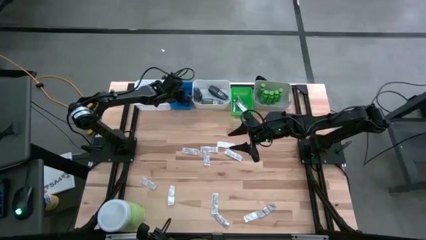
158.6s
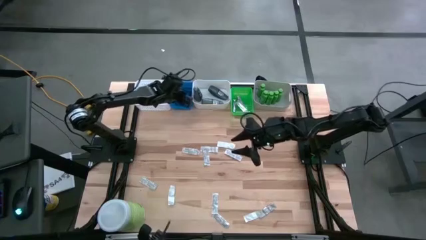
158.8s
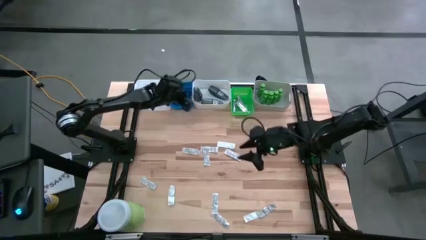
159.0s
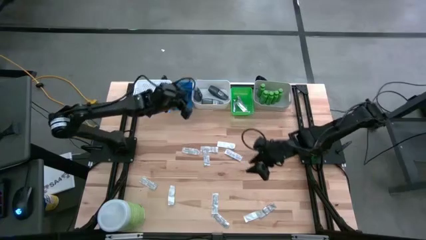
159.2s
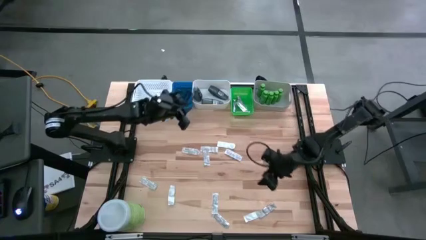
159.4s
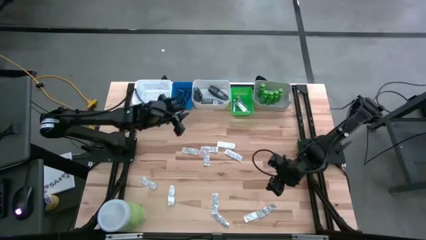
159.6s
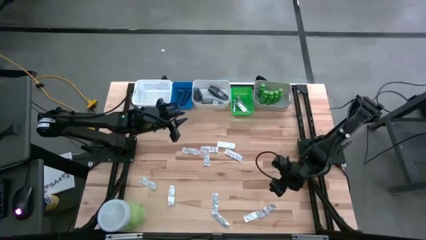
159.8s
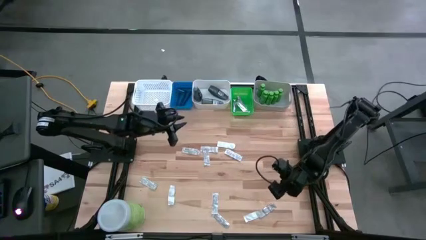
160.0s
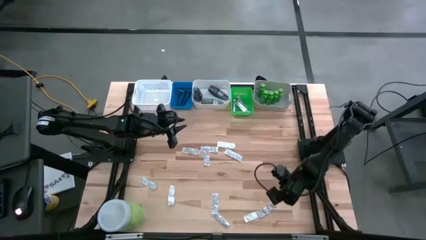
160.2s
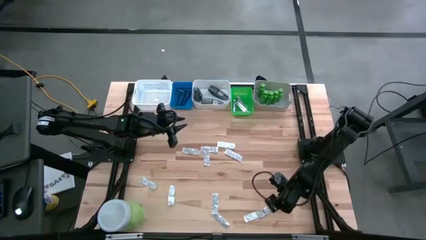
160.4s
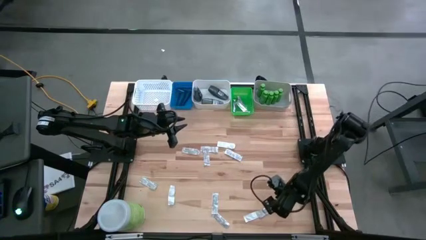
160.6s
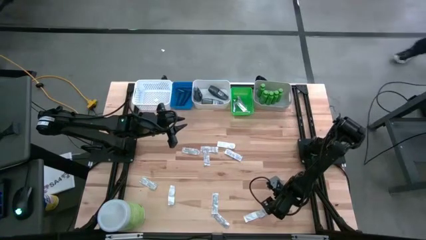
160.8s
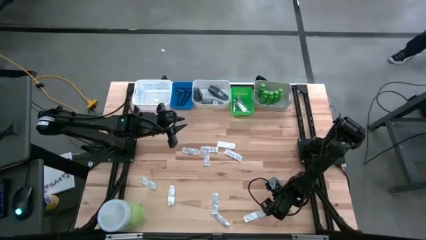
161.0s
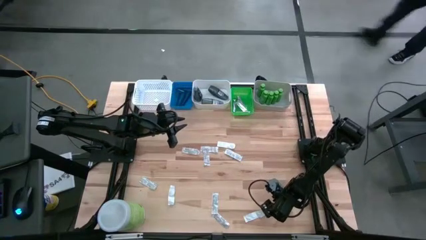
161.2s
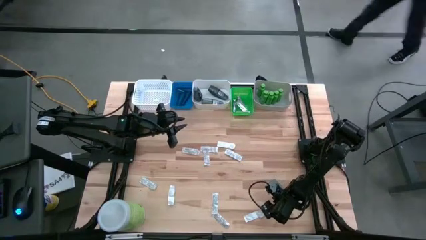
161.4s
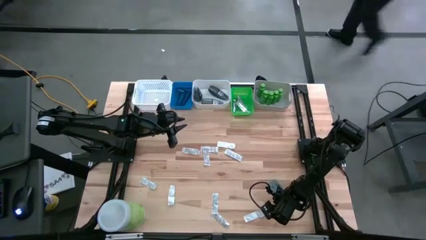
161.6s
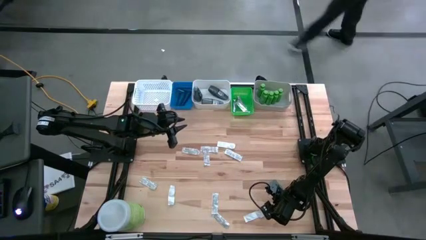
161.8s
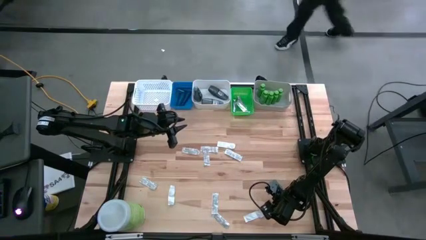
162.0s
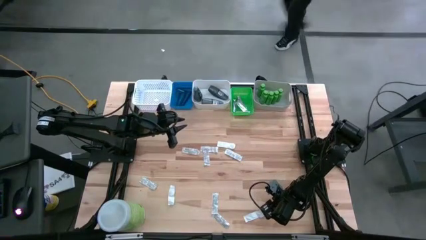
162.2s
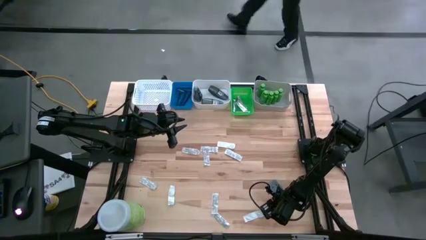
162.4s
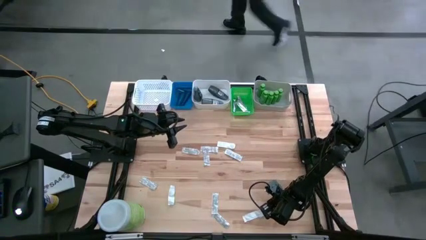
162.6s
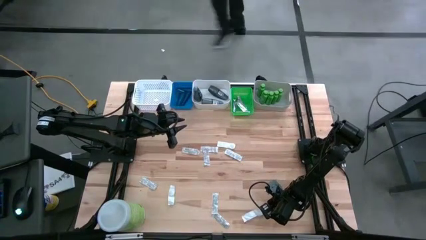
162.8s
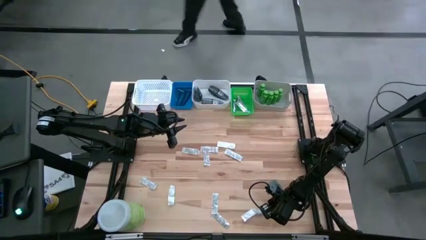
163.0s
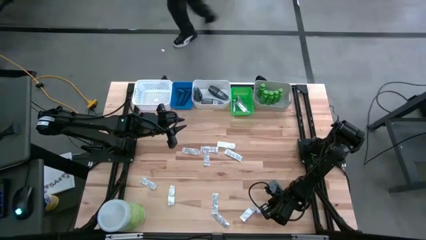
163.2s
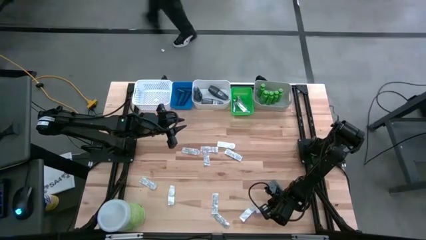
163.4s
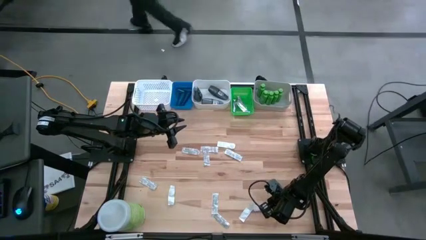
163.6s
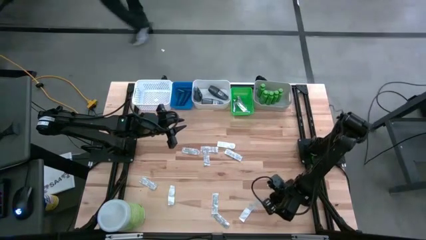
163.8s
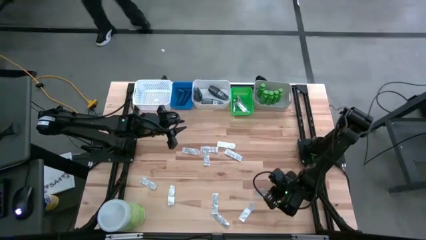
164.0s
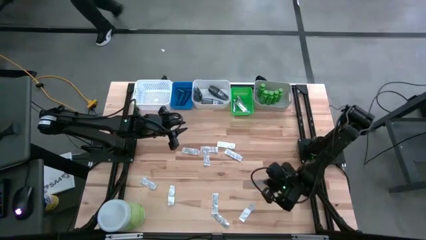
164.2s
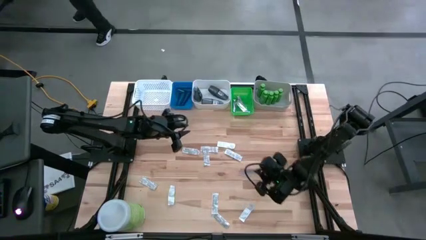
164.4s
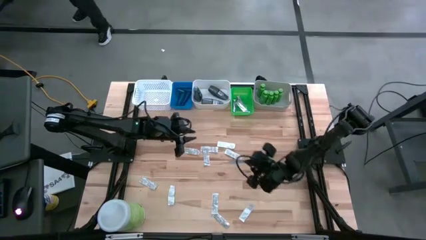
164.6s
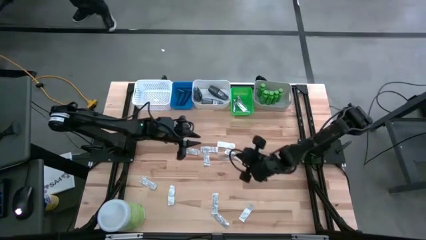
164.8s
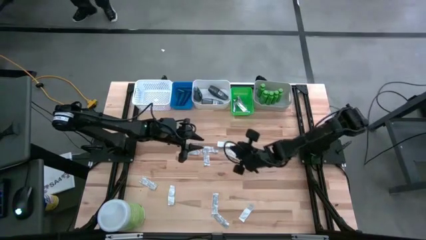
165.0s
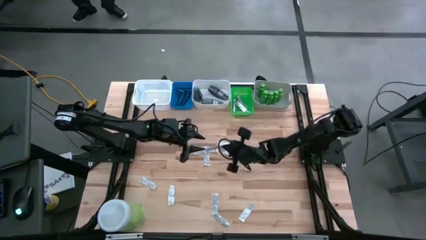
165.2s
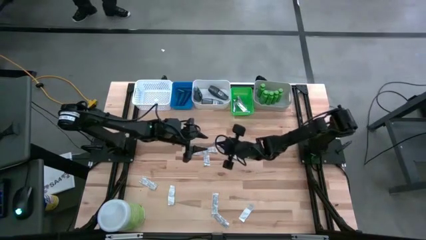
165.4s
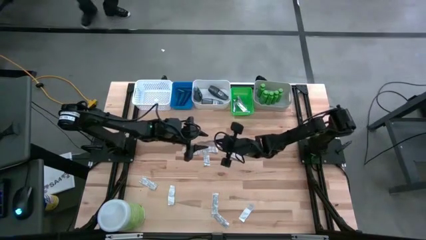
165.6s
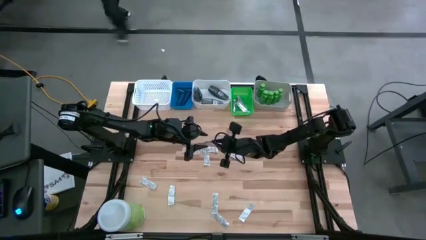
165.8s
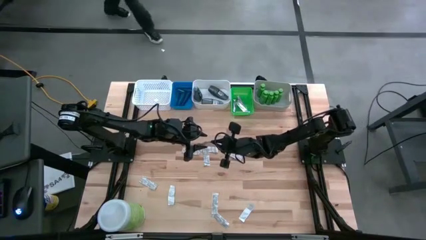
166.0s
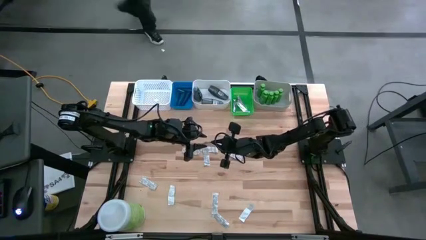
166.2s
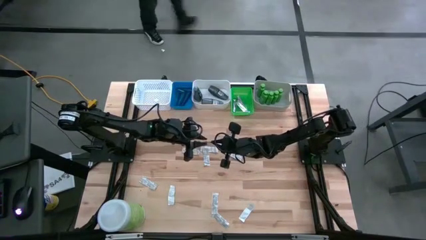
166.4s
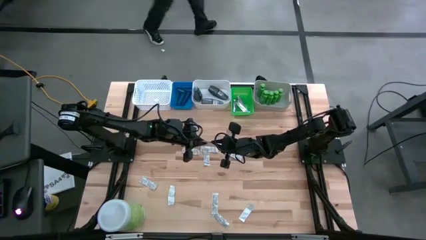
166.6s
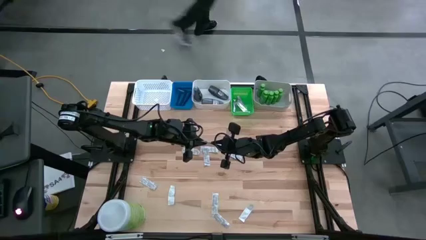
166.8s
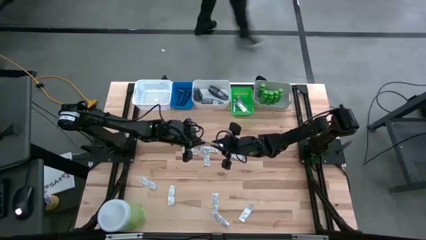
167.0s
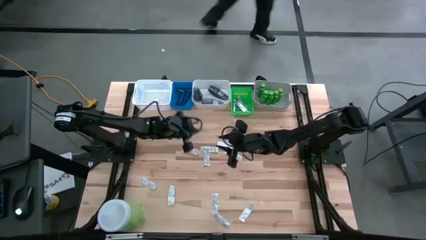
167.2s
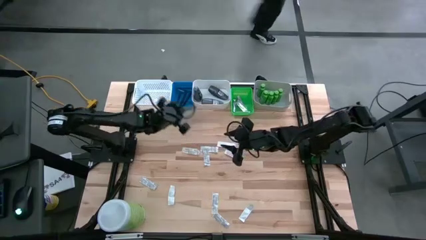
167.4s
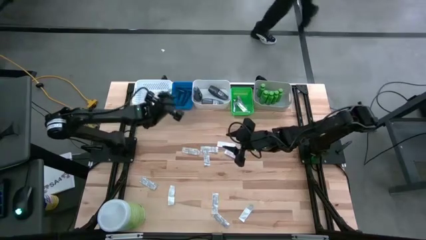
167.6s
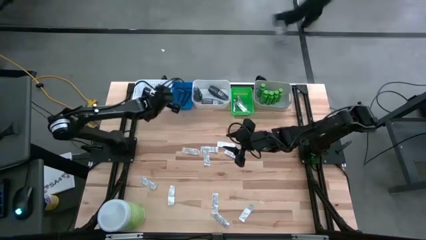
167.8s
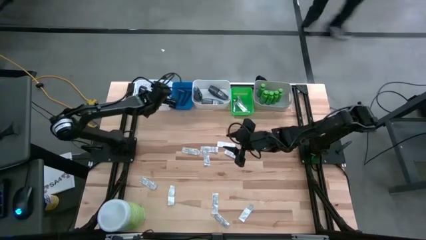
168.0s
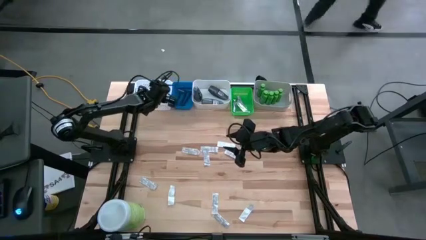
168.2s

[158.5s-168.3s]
Task: Pick & Place Travel size toiletries
Put the bandage pack into the left white bin

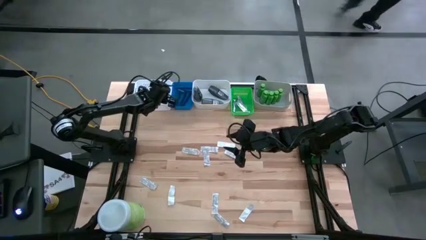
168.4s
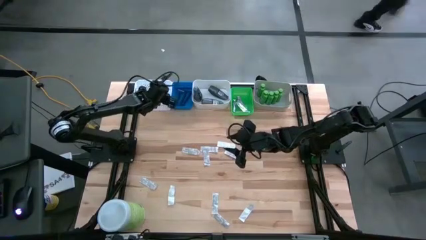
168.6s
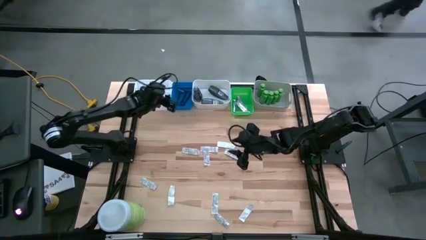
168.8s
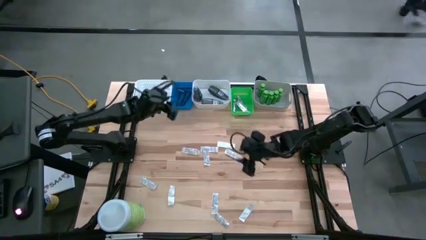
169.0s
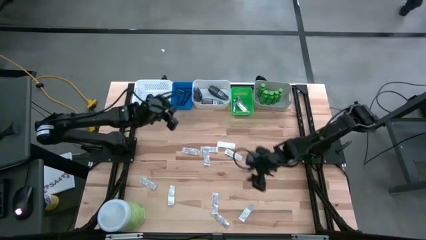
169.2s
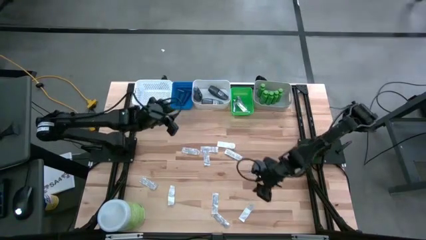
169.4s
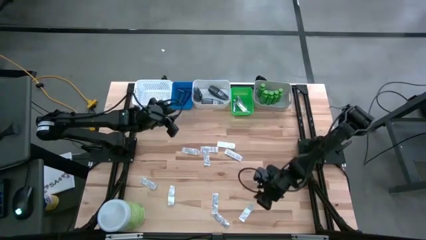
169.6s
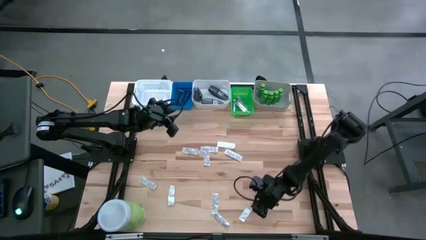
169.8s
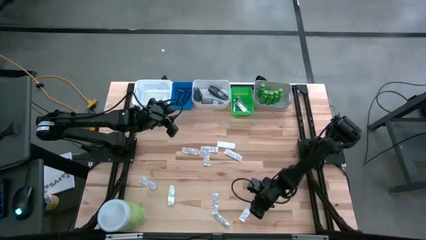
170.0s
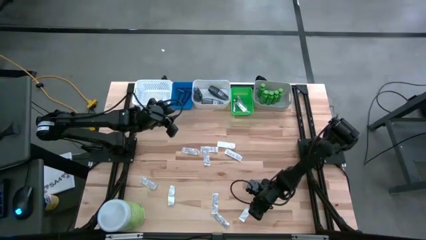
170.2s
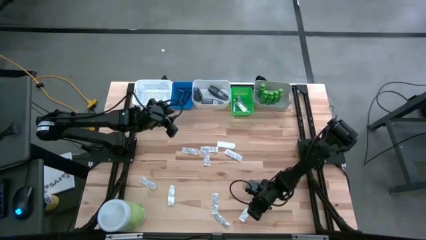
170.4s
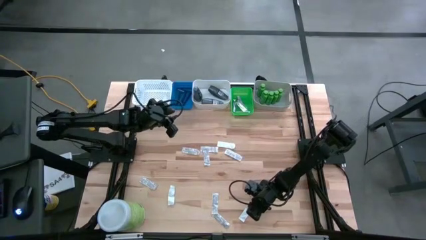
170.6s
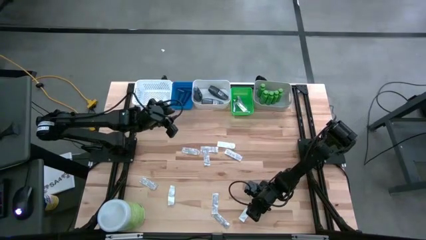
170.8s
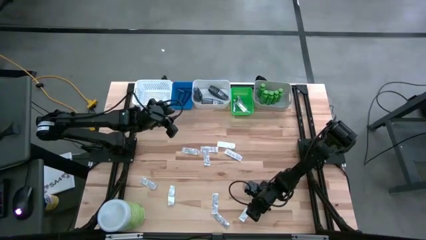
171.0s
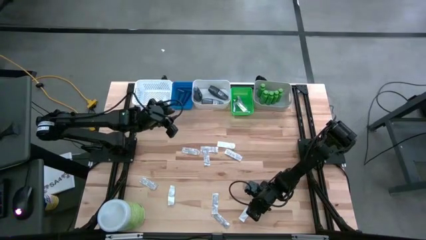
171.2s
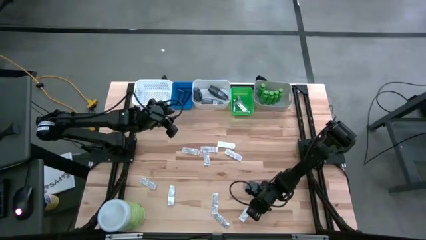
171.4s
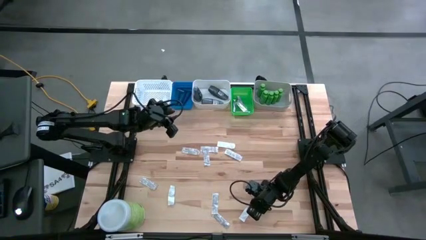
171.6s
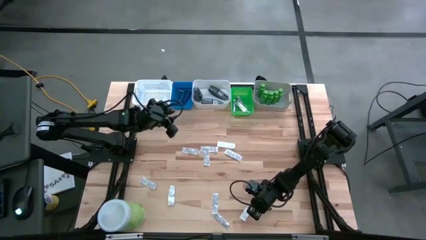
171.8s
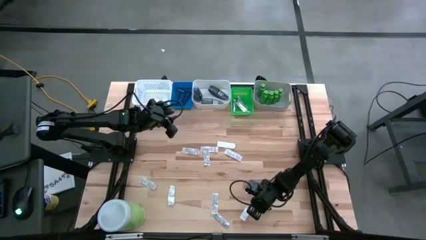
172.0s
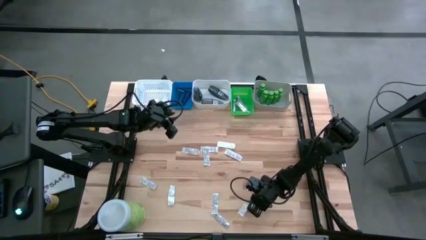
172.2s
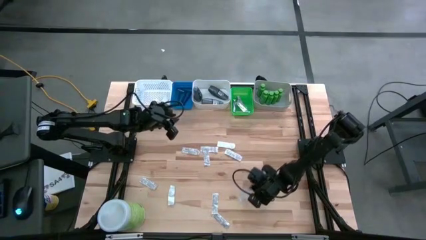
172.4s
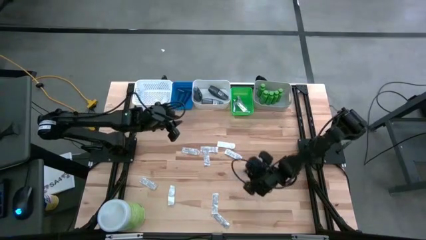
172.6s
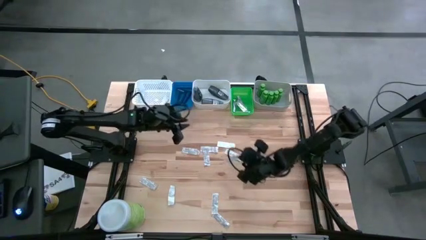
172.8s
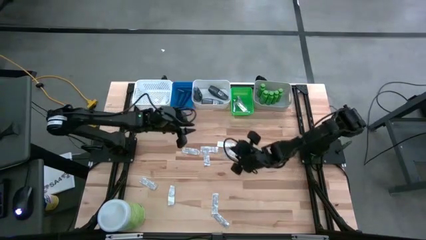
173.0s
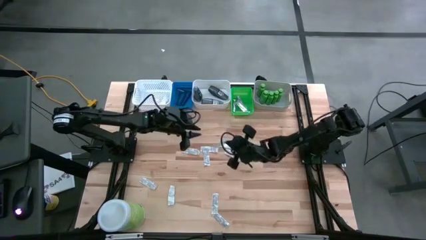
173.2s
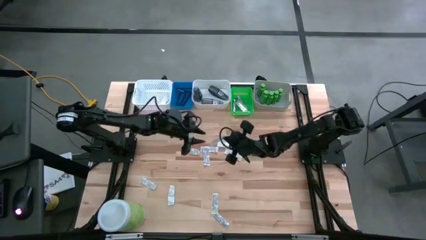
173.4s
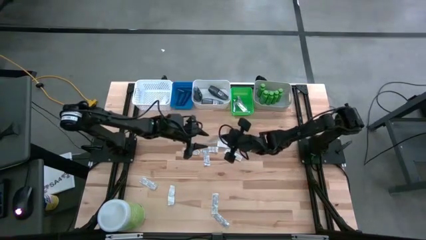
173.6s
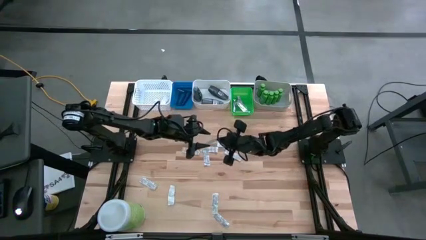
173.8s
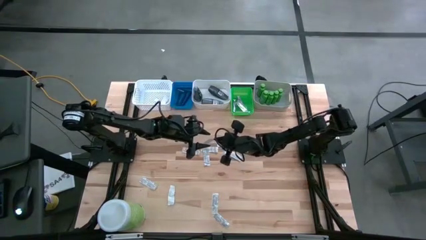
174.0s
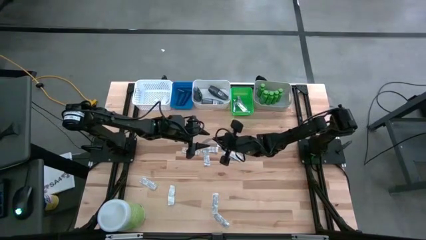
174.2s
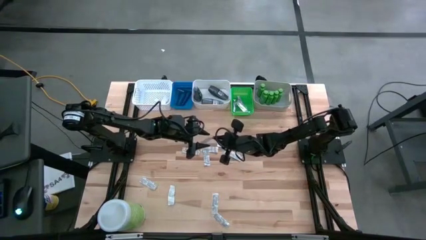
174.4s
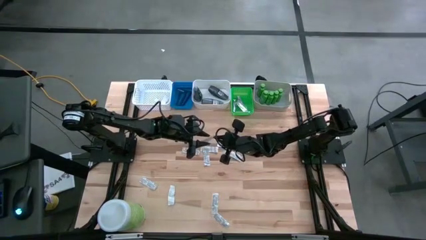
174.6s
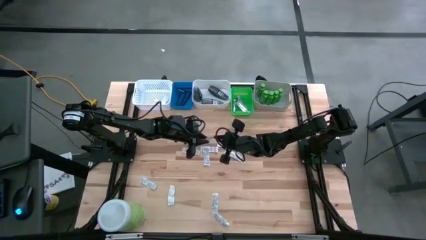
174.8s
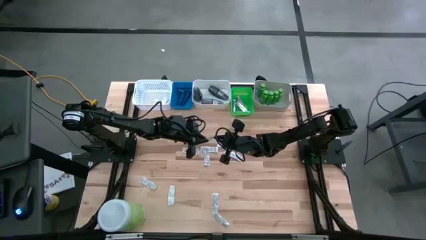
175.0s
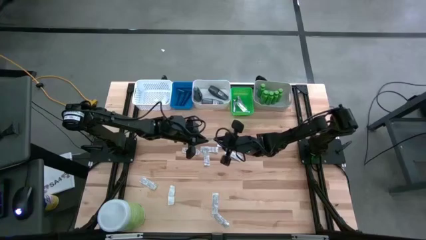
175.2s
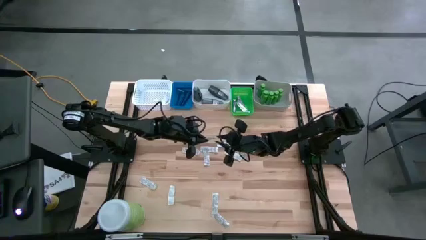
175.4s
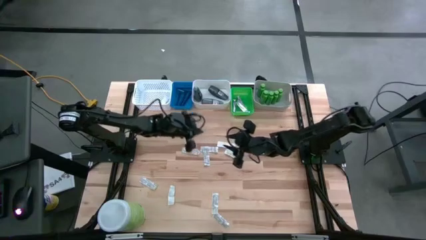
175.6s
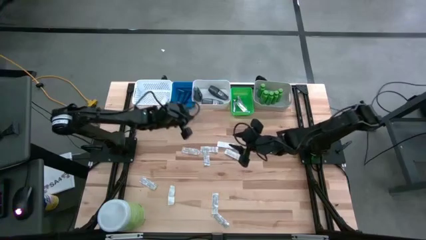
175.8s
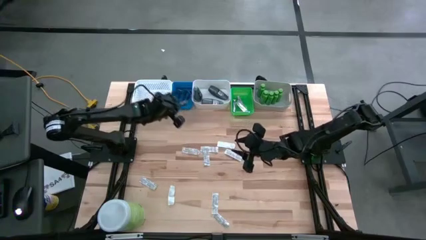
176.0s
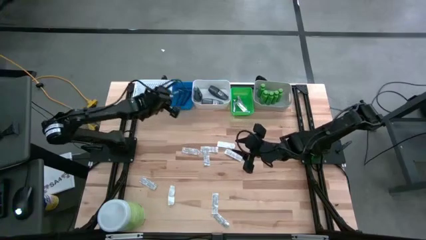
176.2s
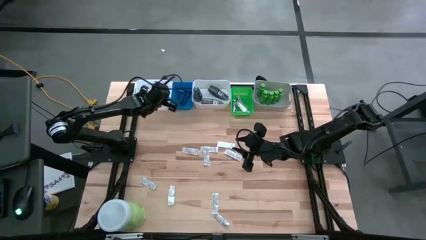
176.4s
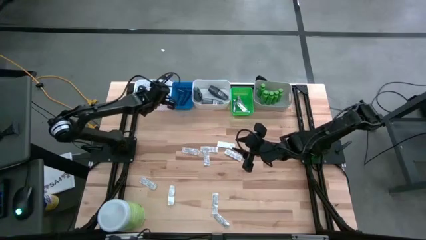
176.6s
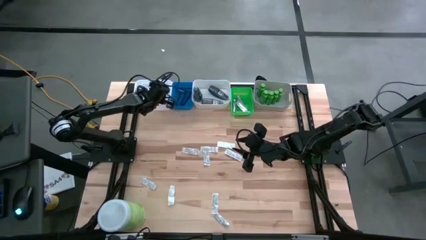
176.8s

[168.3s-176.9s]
Put the bandage pack into the left white bin
